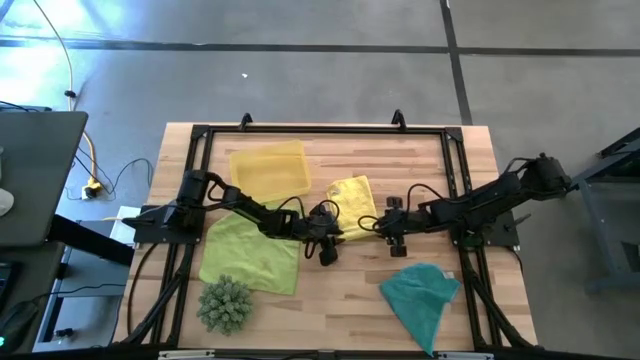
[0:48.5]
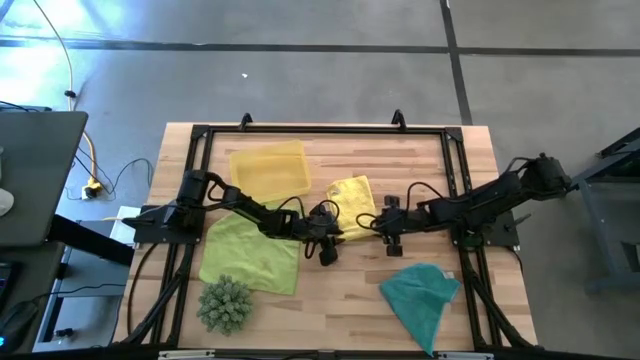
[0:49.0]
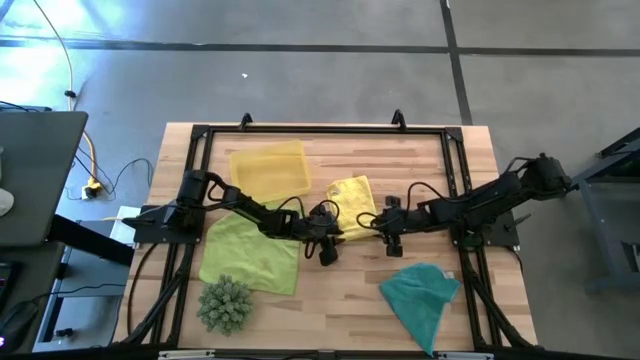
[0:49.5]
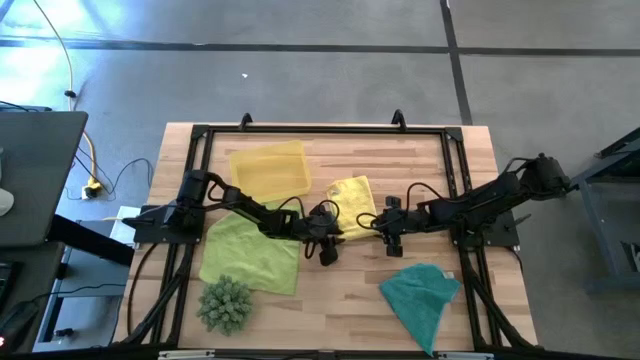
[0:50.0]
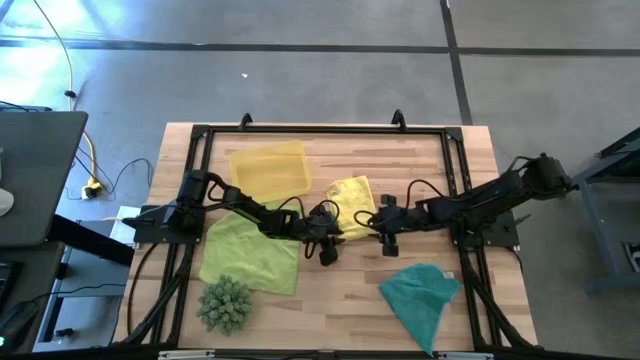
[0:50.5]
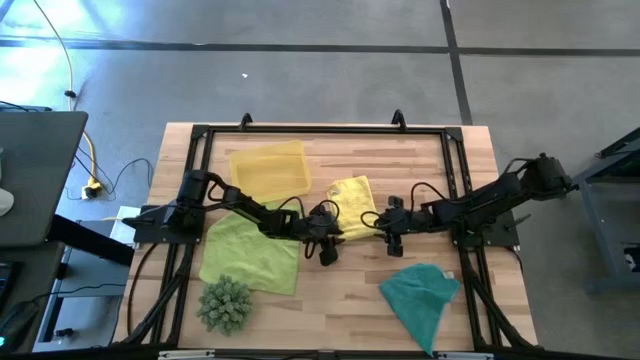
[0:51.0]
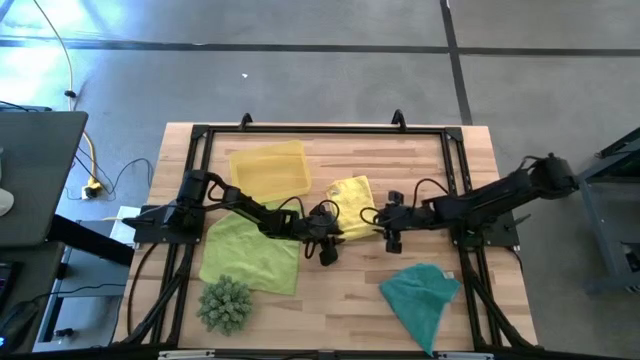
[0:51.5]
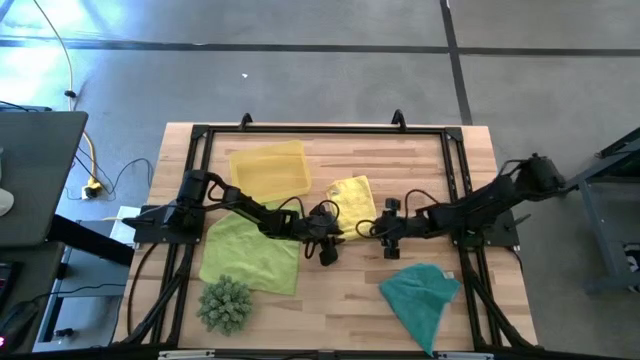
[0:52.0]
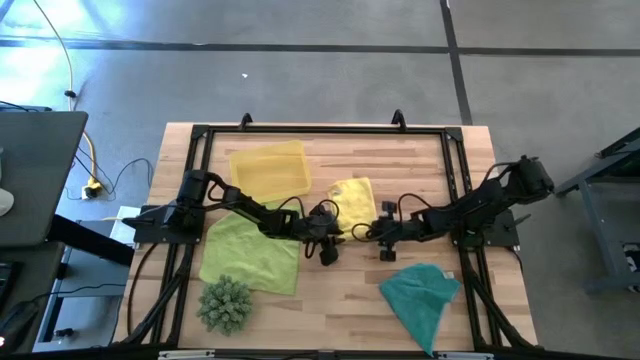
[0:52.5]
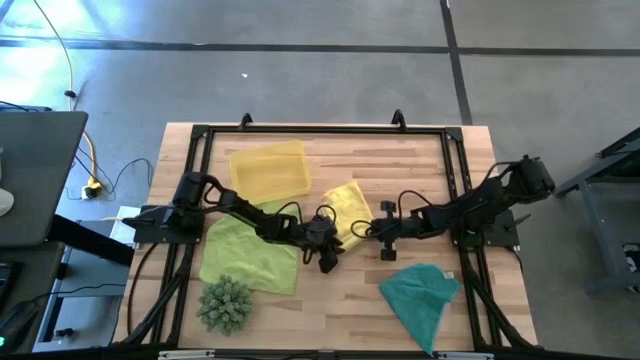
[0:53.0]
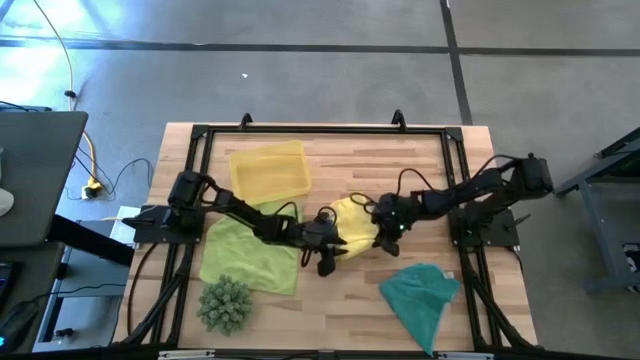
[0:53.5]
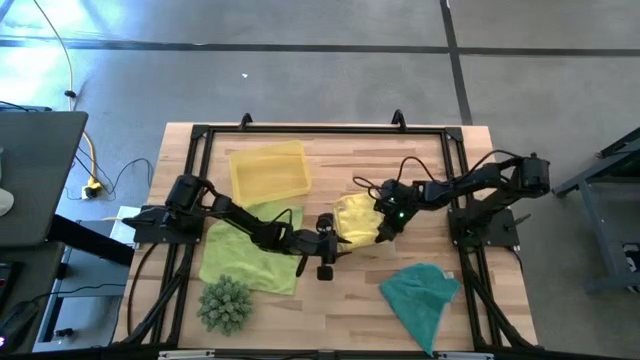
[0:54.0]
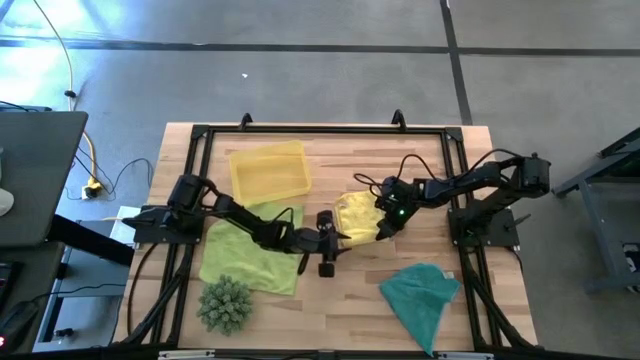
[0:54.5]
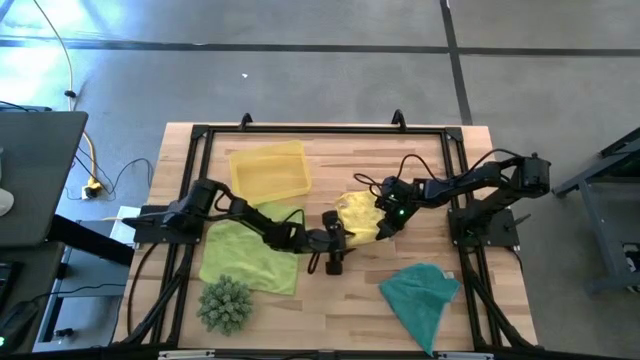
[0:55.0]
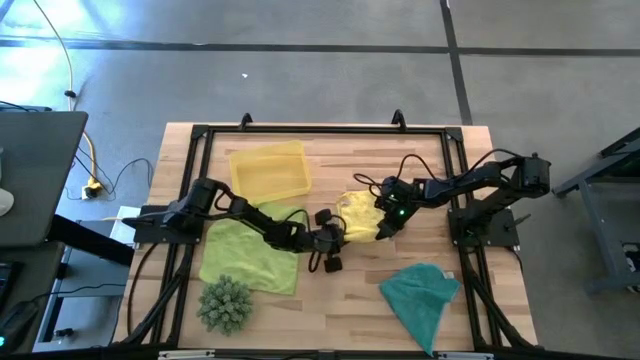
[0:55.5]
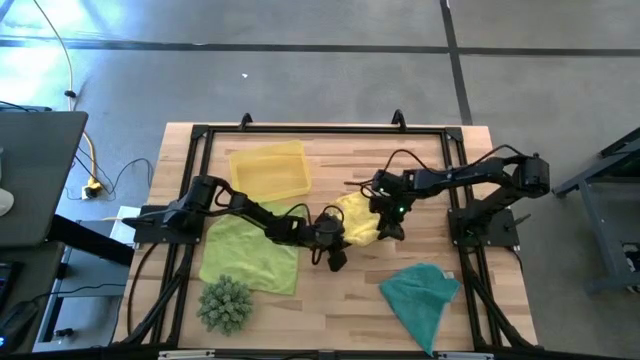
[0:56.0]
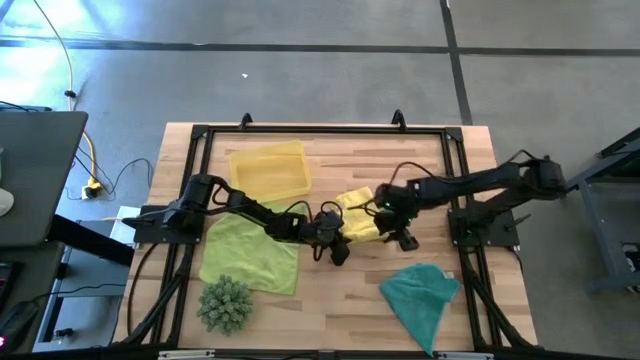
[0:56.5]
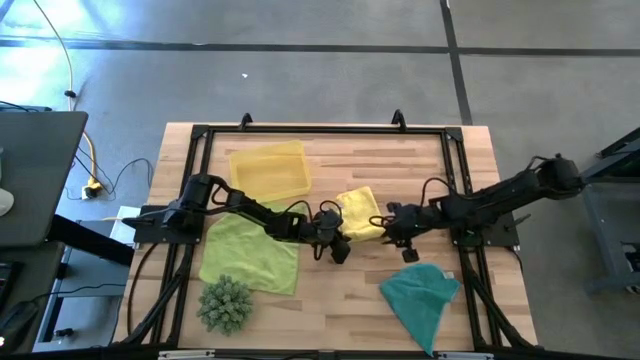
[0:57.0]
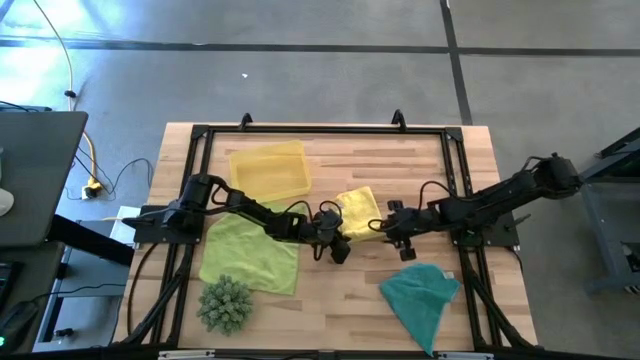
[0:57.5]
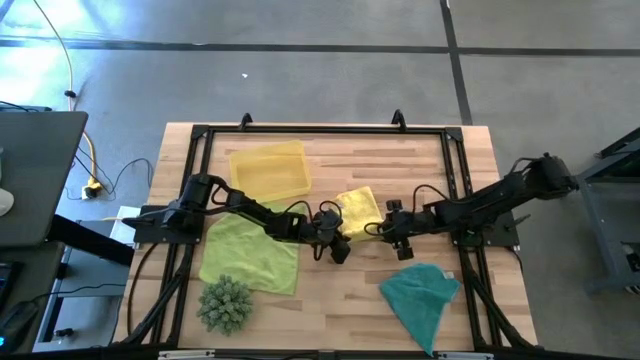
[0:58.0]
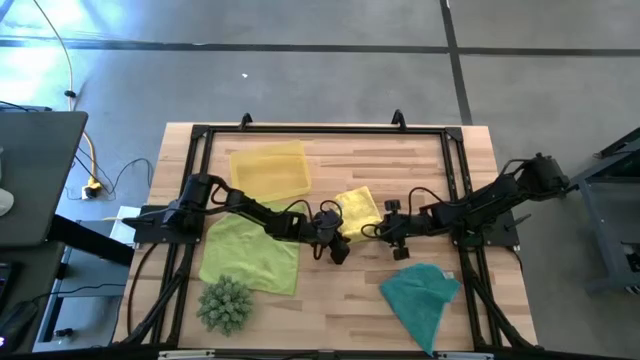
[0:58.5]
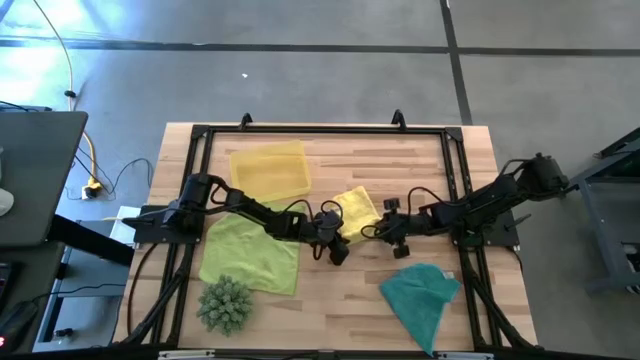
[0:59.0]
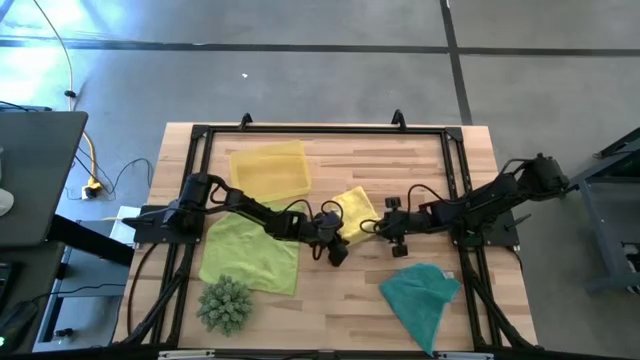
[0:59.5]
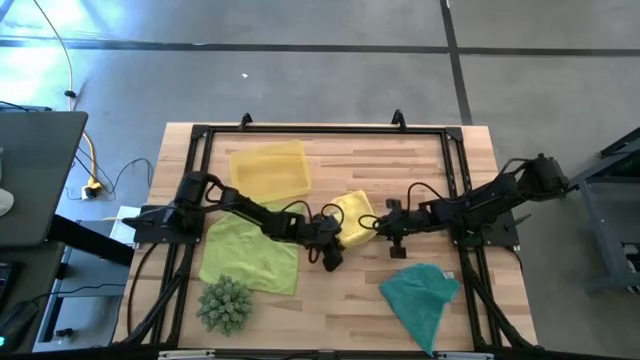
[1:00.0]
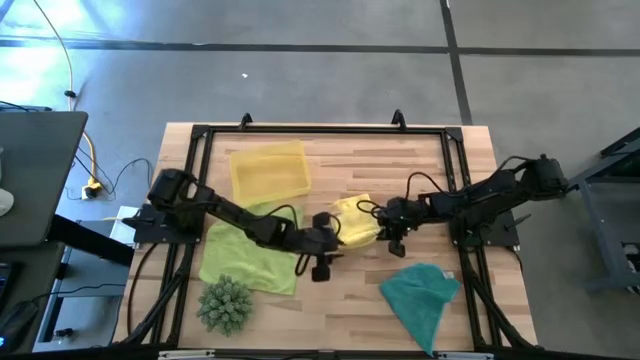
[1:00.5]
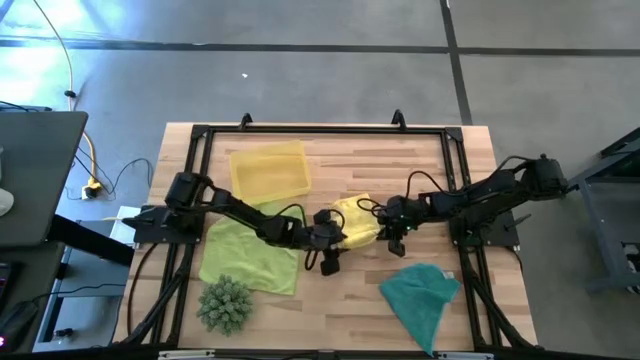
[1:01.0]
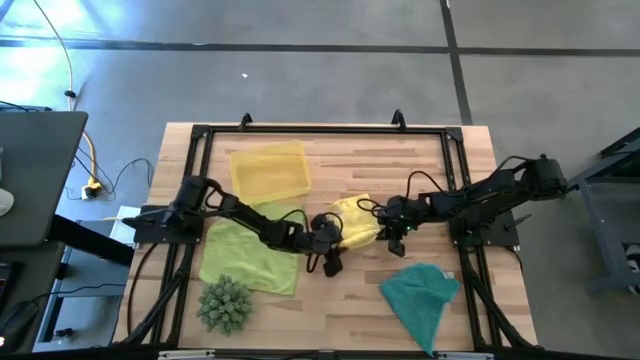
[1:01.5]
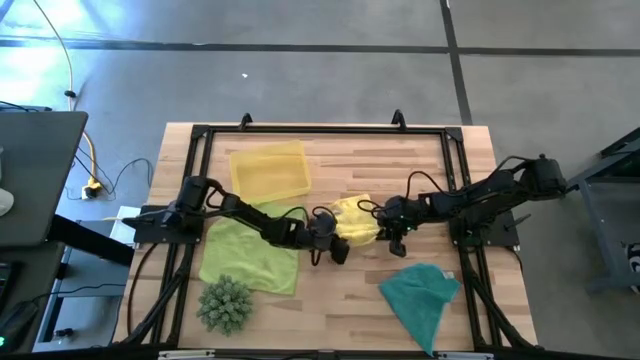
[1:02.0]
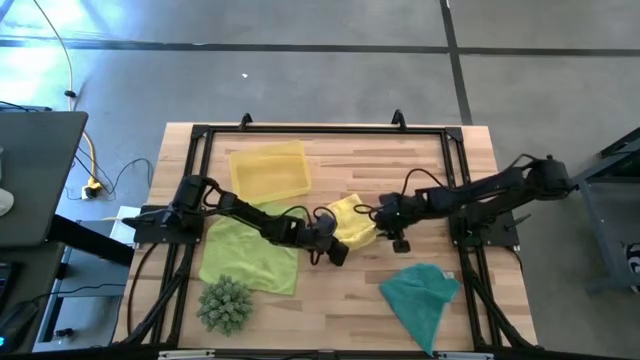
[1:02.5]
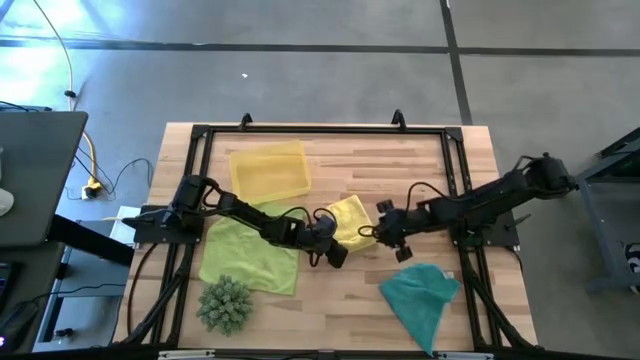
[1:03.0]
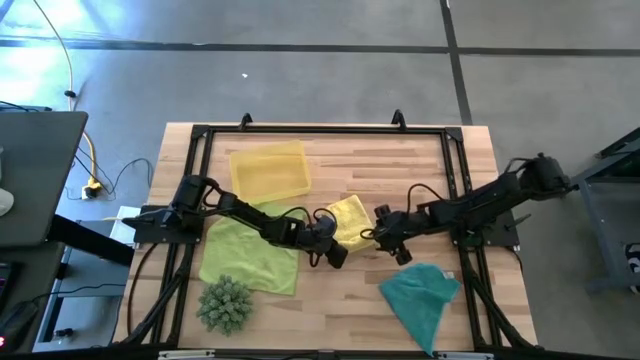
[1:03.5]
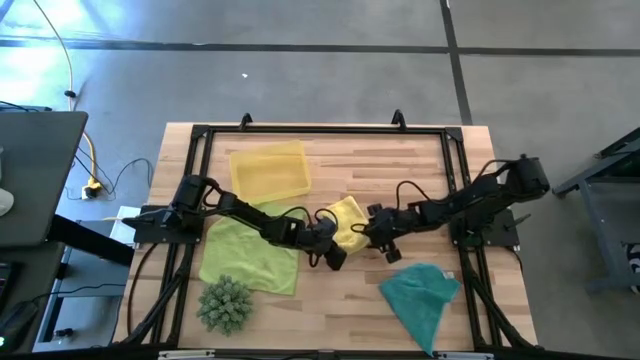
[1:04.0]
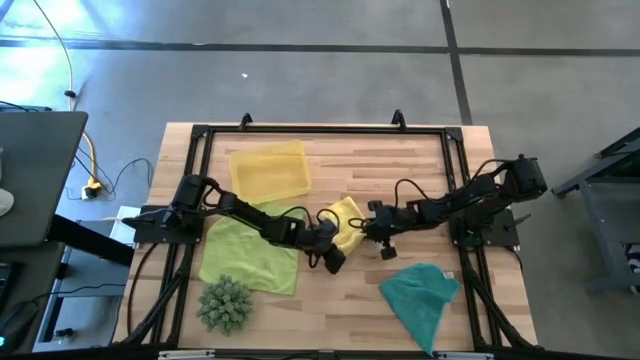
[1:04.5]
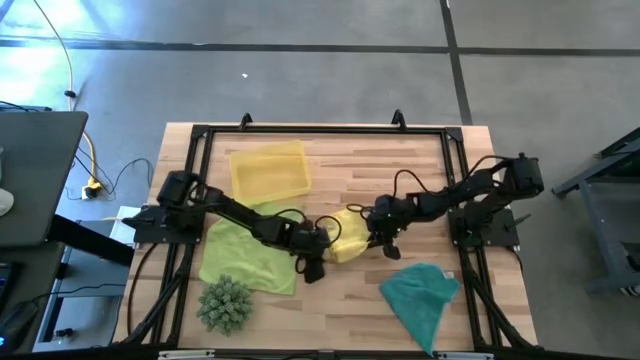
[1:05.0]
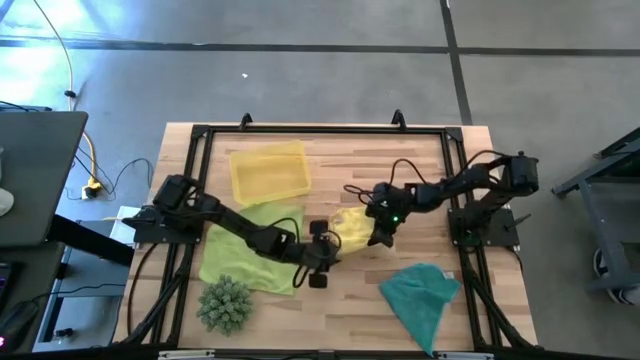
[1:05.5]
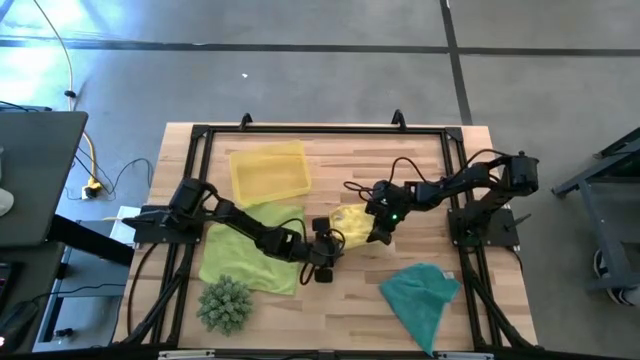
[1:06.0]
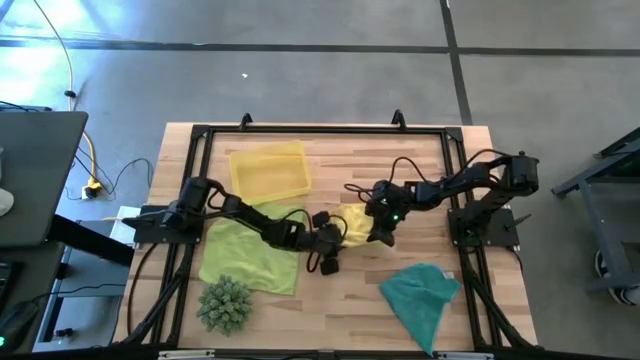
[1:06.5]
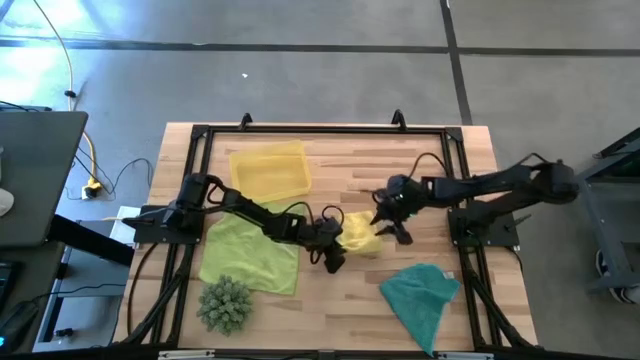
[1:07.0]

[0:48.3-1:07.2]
Task: Roll microfiber towels into tight, uniform cylinder then place into a basket
Roll the yellow microfiber towel
